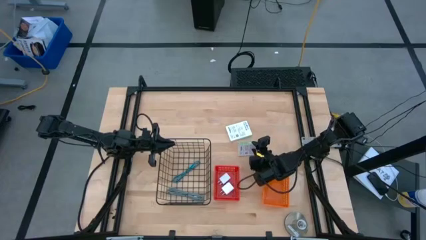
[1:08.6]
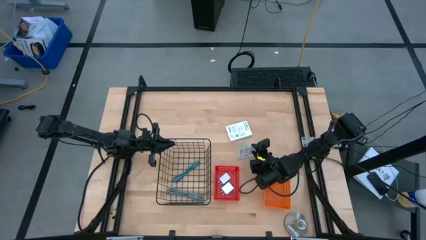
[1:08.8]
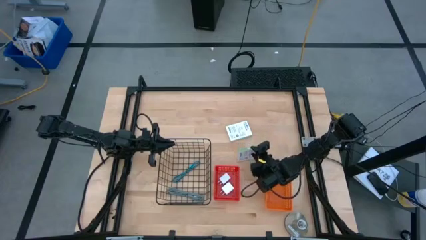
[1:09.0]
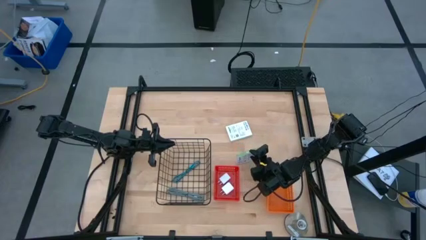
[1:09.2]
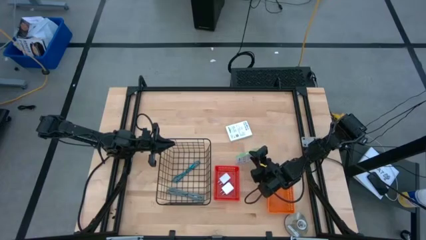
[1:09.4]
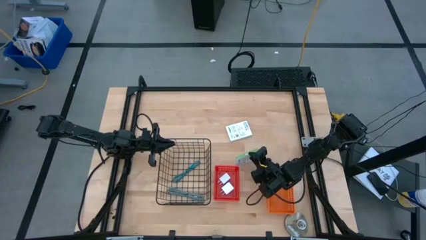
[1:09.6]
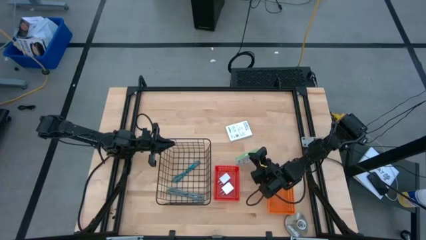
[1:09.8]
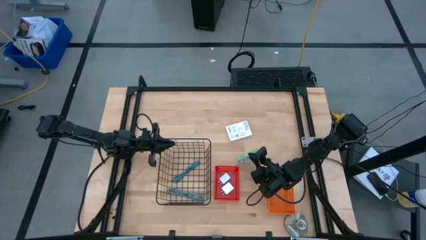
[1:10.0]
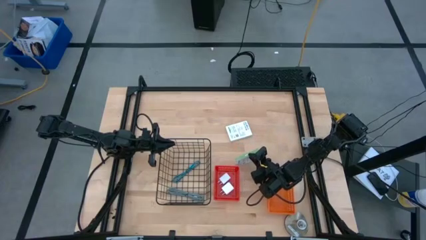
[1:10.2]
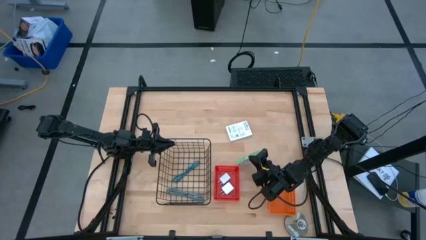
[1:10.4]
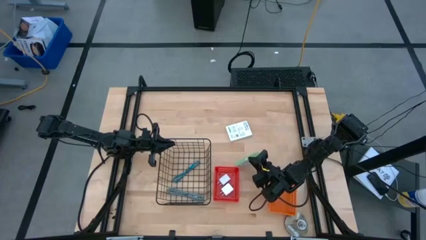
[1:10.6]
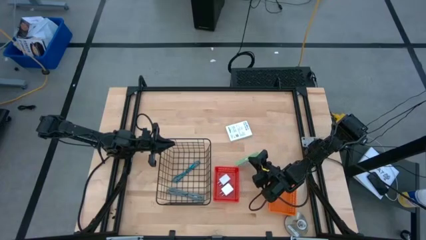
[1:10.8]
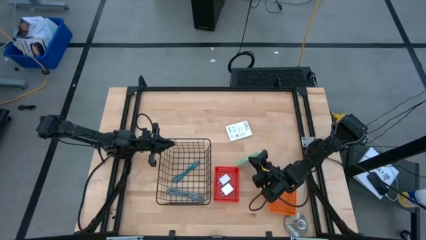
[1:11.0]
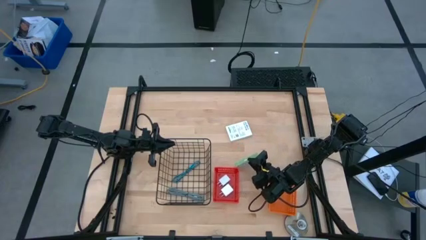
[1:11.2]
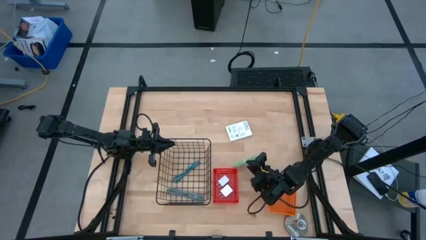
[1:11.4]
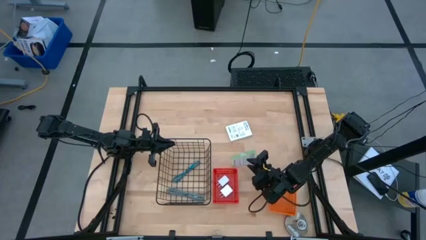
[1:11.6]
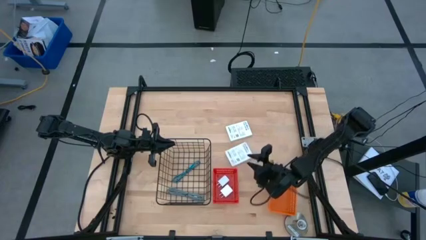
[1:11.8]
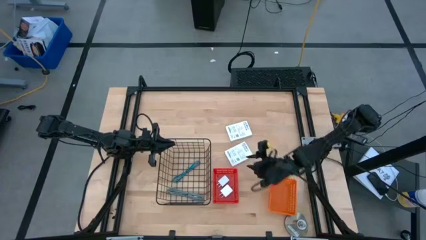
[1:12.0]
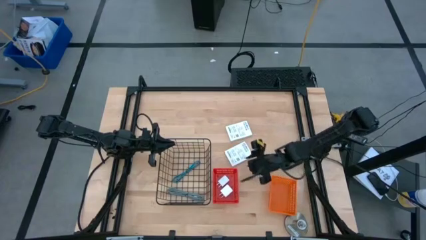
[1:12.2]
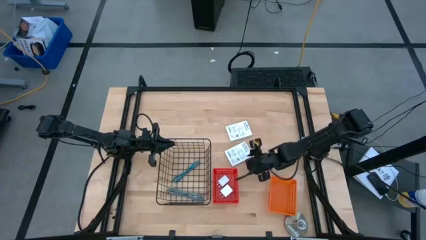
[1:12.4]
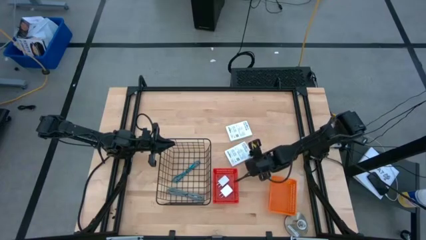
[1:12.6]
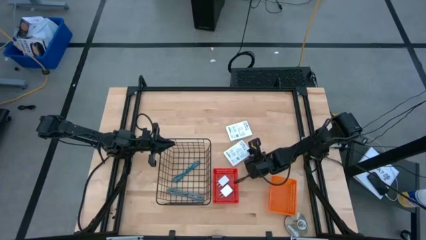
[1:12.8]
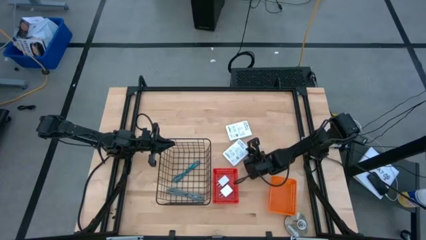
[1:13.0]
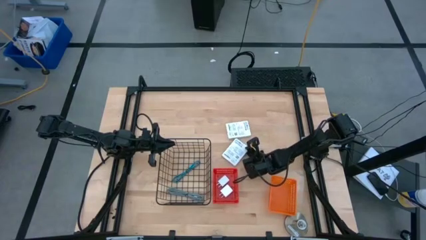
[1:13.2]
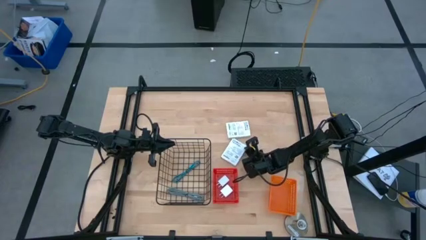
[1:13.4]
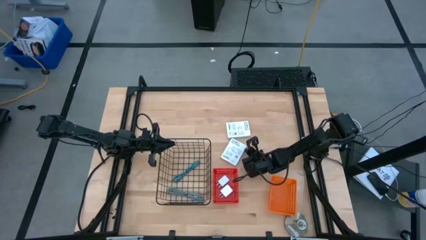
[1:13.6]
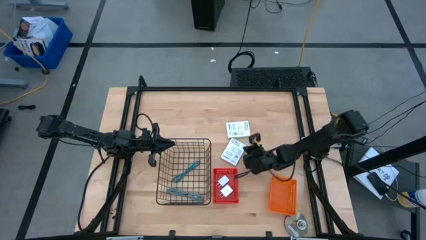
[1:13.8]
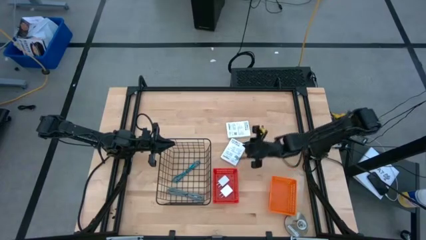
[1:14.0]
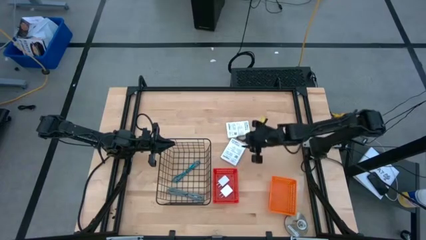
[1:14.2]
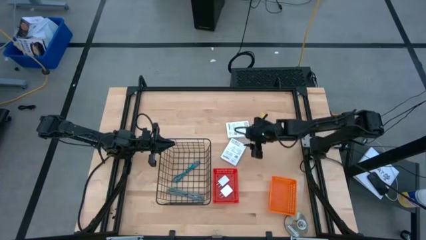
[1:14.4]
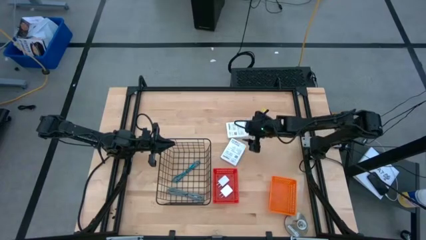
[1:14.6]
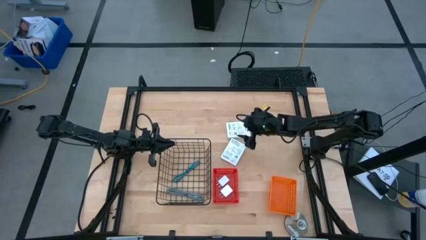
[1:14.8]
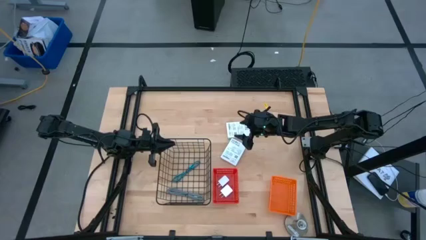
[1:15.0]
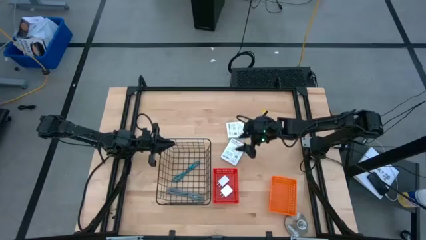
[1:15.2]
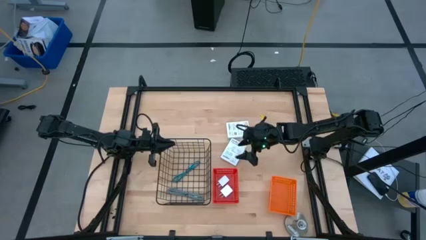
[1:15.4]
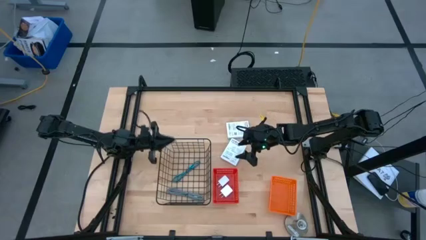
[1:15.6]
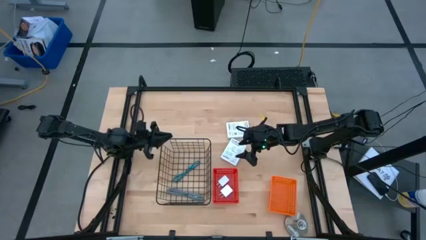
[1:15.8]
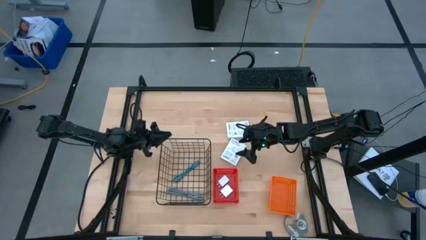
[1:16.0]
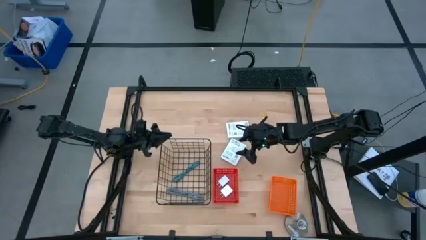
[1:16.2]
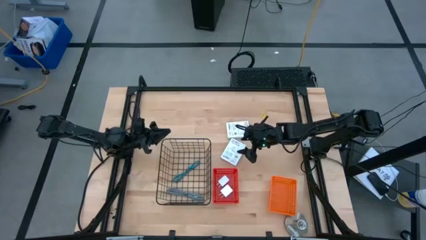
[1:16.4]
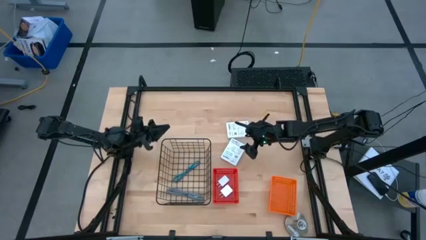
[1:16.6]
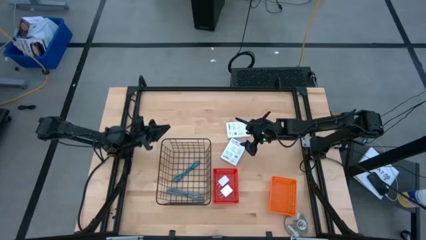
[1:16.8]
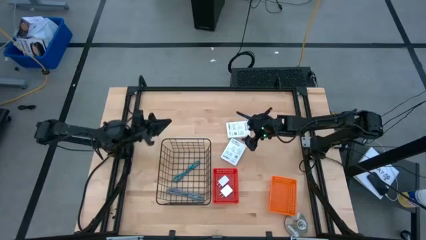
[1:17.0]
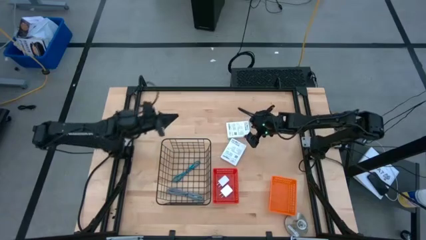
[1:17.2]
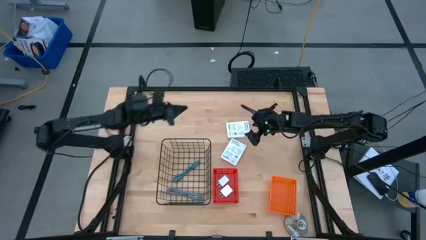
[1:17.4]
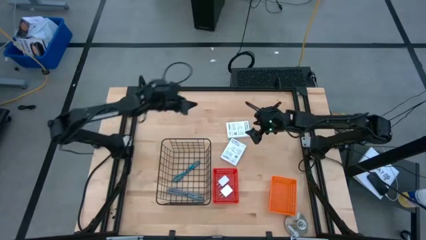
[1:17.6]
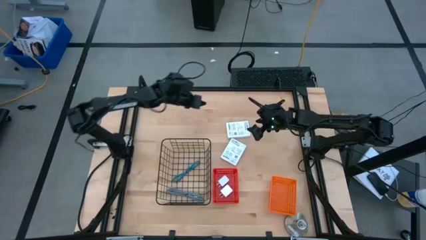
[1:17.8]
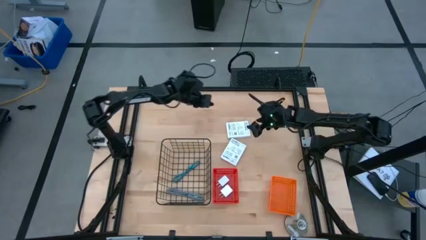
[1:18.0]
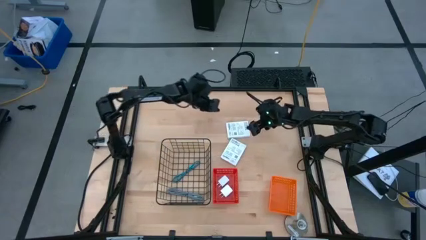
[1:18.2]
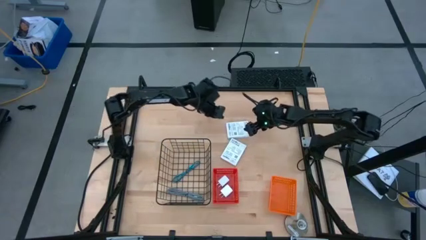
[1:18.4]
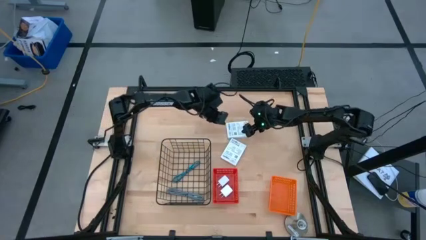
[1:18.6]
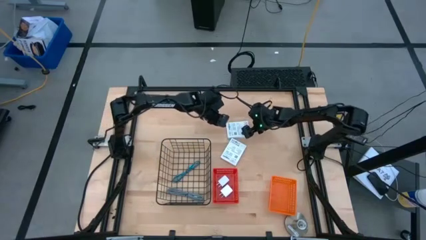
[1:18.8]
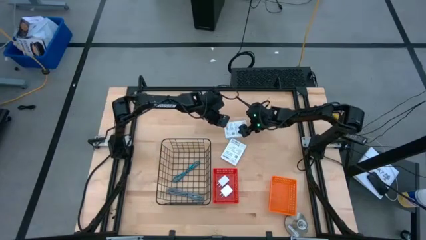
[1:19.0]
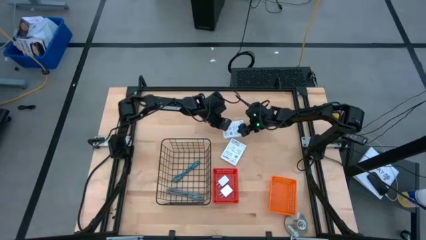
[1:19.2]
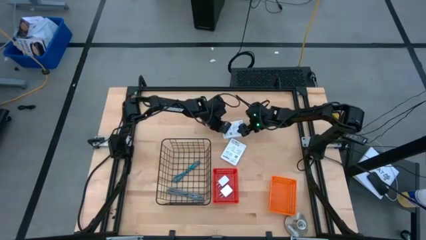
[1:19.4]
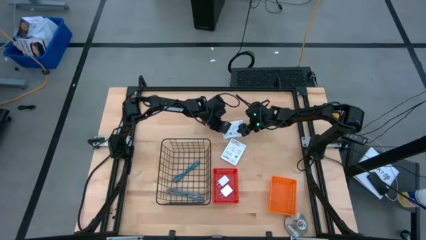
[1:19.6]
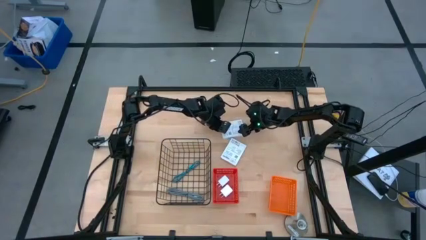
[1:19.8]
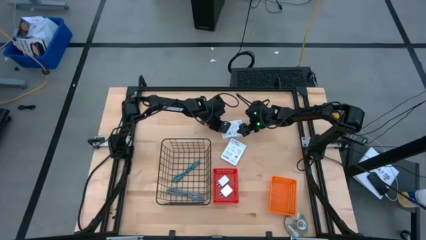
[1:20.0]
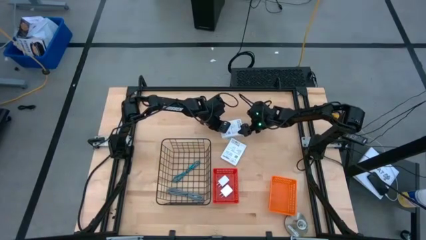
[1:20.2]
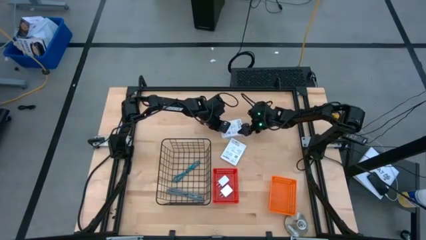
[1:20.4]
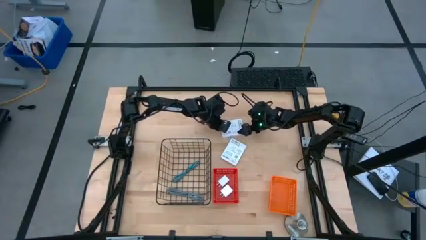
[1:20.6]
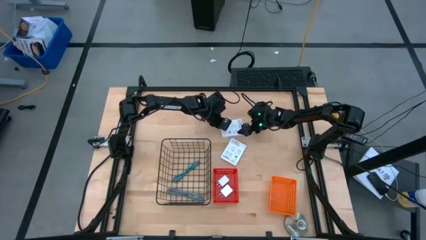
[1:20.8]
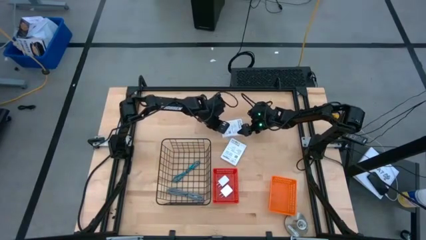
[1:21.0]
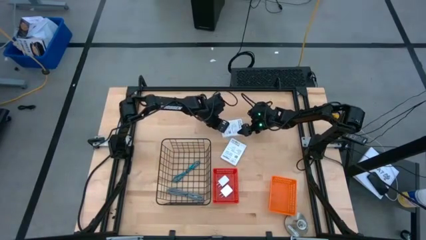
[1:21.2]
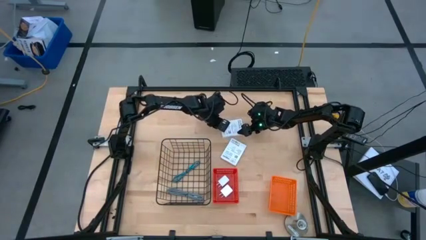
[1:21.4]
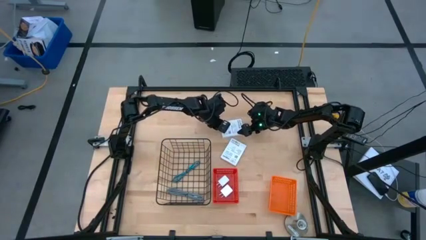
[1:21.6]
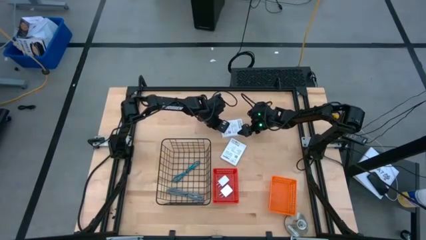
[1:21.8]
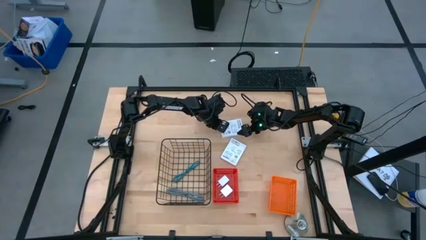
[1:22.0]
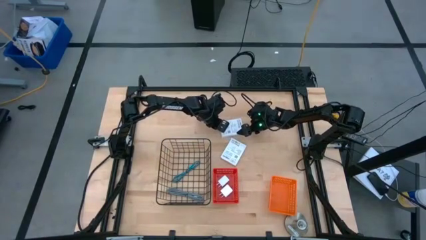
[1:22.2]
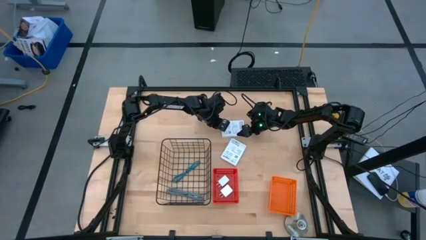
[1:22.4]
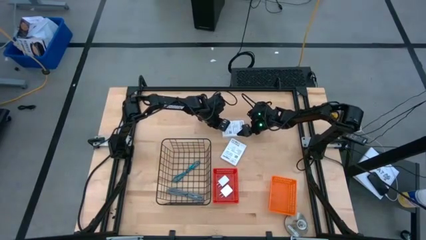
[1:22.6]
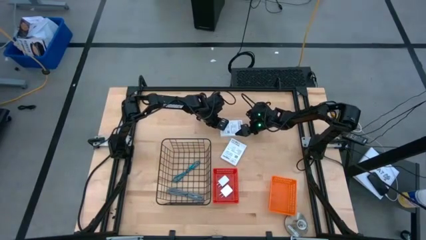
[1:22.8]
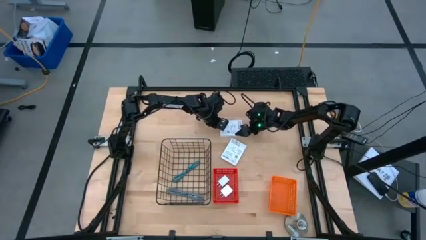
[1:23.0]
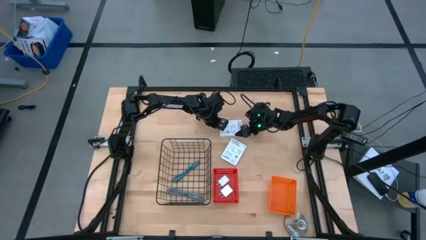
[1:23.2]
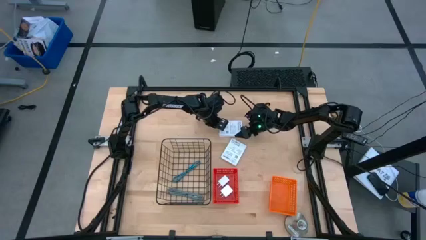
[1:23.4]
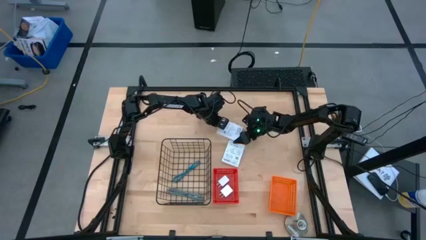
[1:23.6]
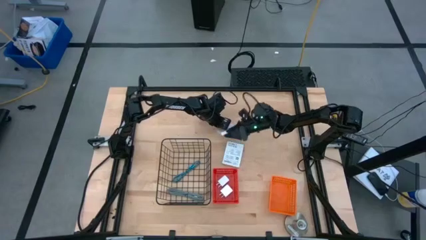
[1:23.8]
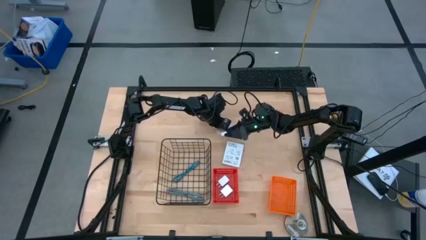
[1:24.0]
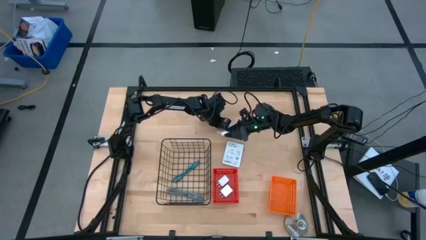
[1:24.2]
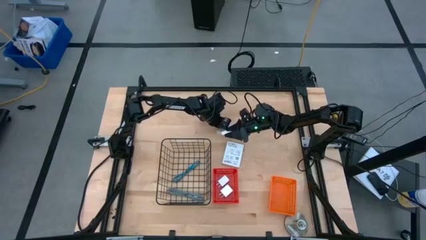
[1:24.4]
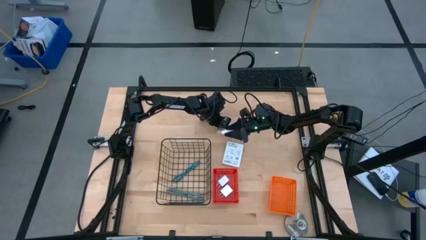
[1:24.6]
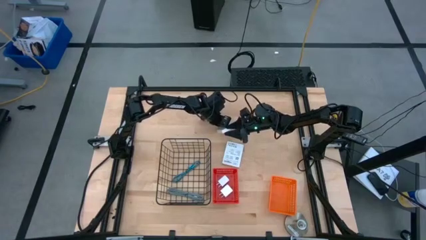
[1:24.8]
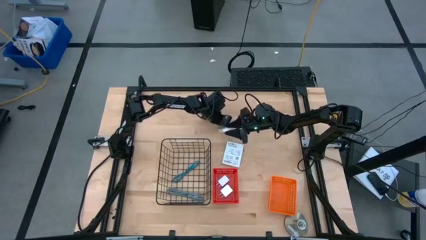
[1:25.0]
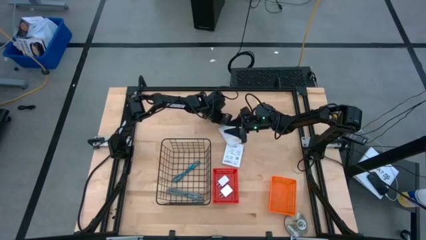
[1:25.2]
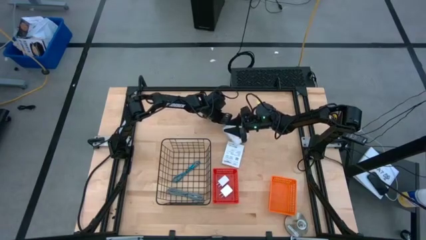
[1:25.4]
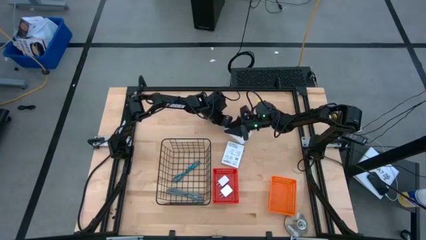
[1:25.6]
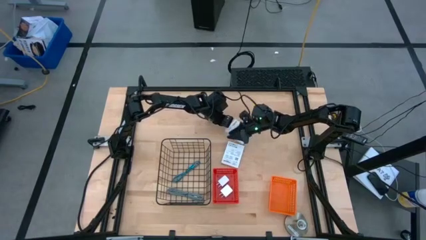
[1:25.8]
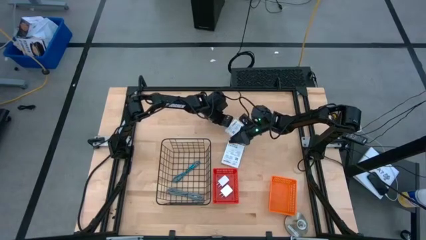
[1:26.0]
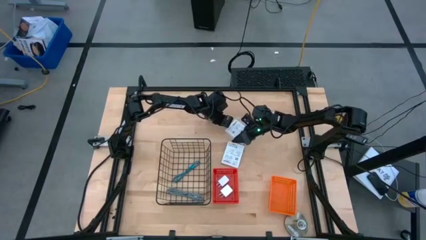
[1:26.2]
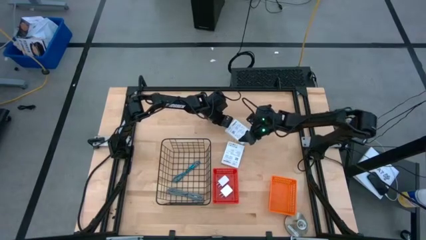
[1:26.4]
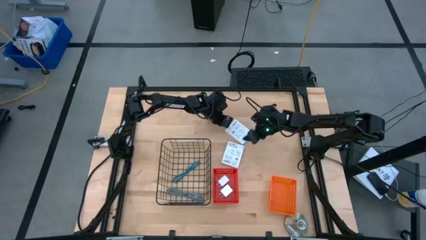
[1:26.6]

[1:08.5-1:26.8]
Task: Pick and place items into bin
Put the top card reader box into the orange basket
